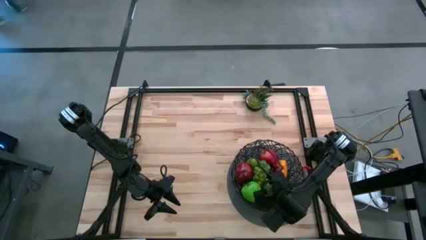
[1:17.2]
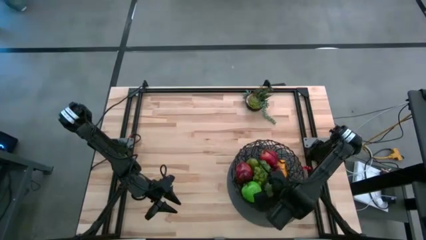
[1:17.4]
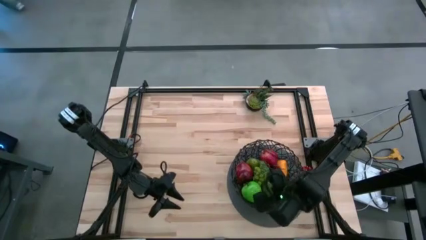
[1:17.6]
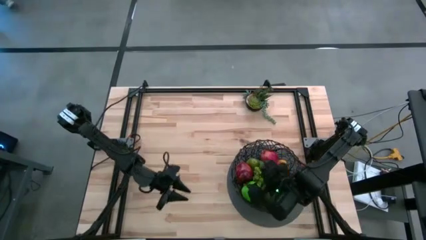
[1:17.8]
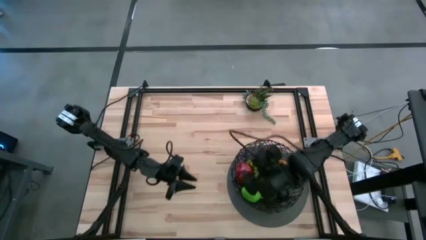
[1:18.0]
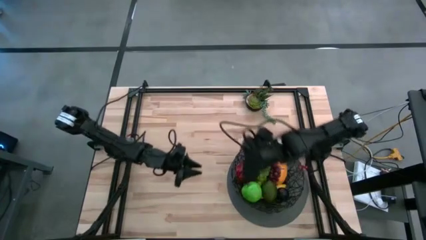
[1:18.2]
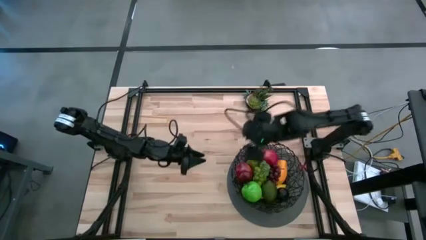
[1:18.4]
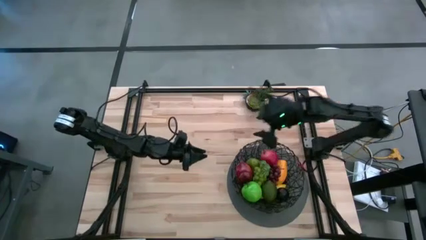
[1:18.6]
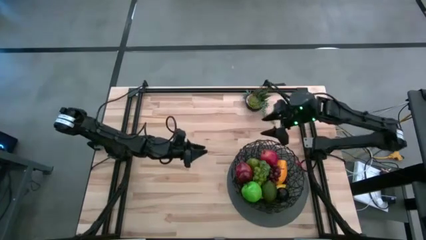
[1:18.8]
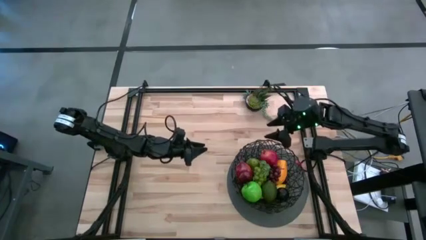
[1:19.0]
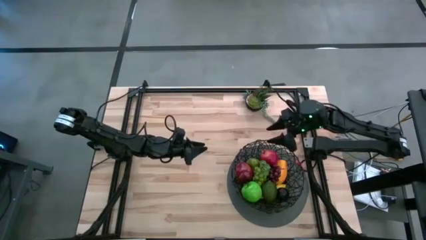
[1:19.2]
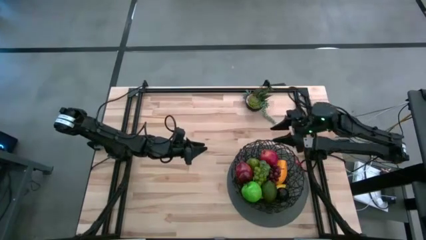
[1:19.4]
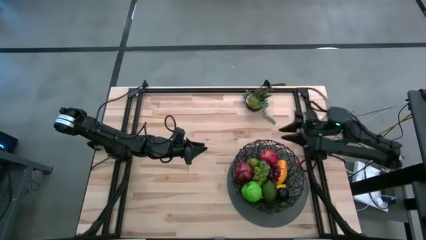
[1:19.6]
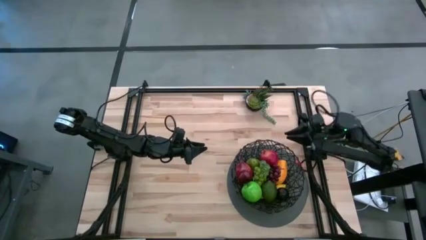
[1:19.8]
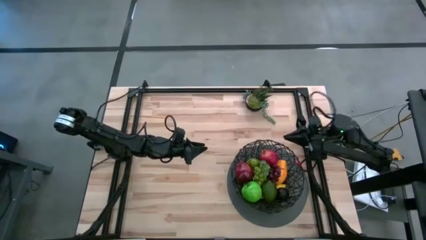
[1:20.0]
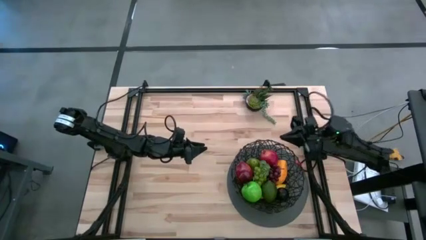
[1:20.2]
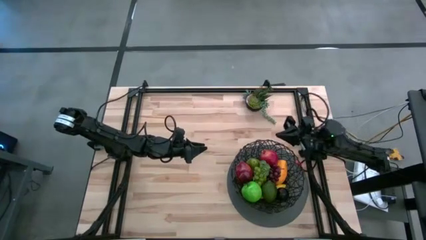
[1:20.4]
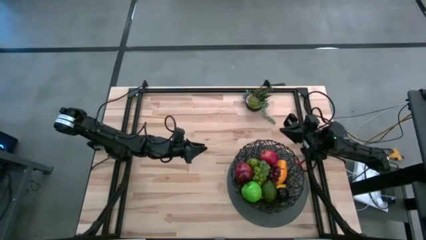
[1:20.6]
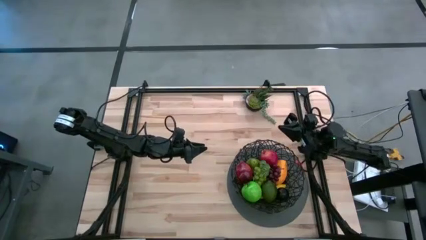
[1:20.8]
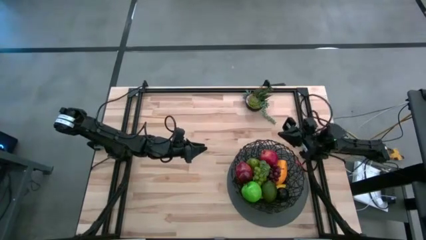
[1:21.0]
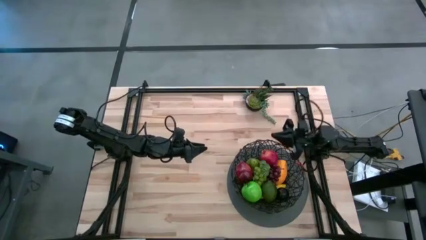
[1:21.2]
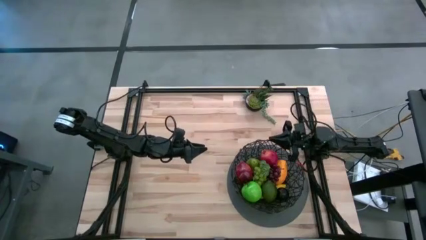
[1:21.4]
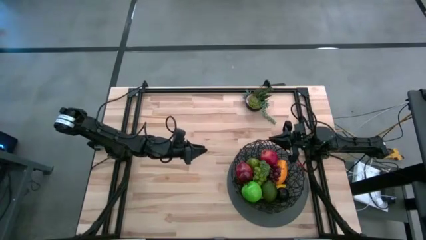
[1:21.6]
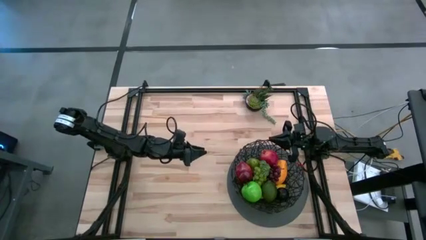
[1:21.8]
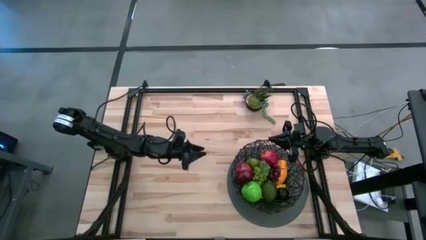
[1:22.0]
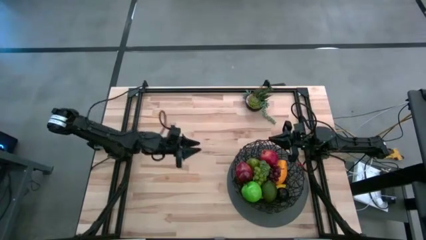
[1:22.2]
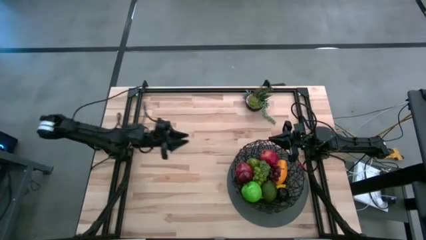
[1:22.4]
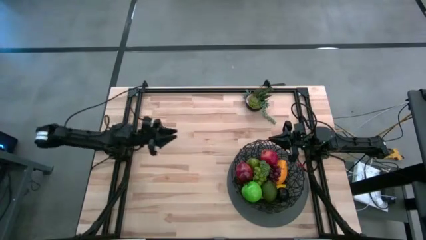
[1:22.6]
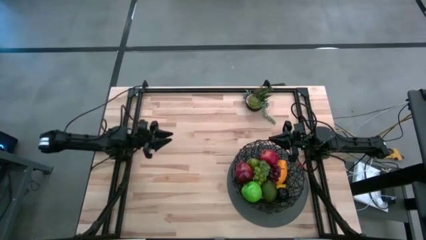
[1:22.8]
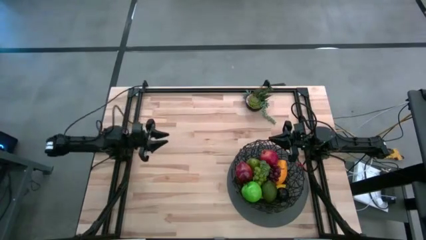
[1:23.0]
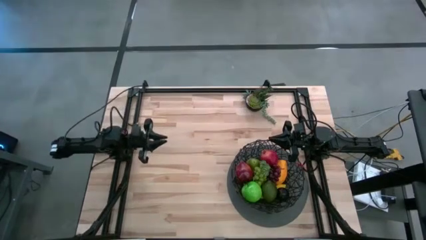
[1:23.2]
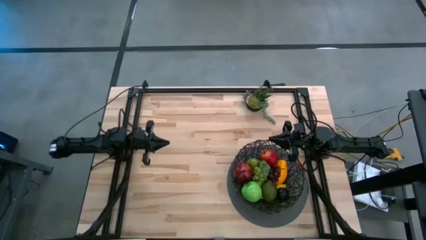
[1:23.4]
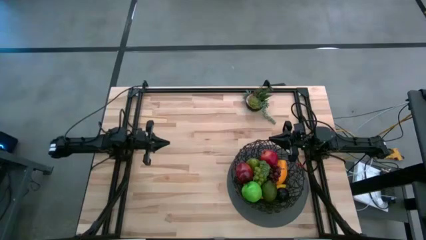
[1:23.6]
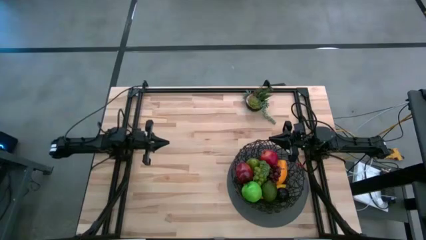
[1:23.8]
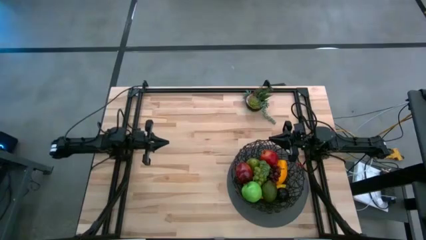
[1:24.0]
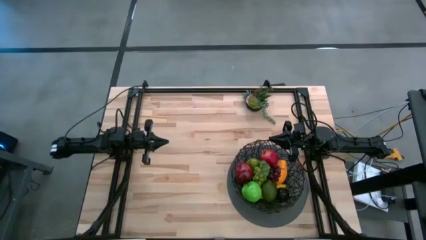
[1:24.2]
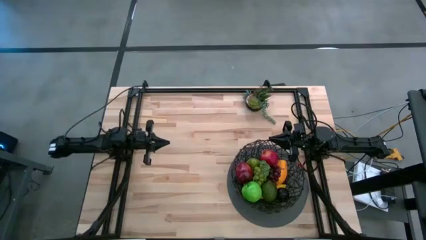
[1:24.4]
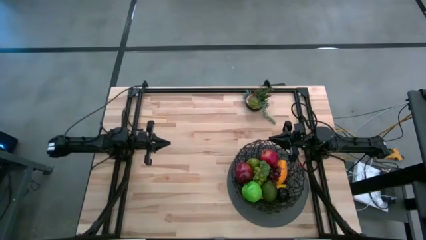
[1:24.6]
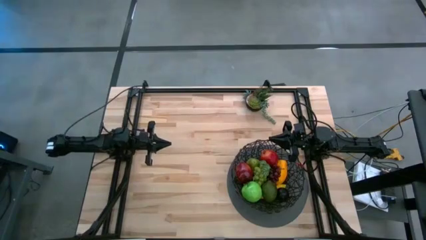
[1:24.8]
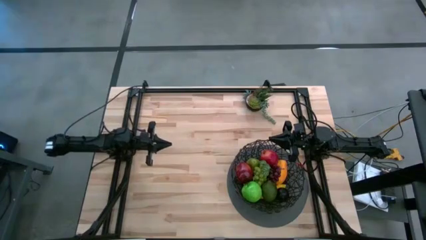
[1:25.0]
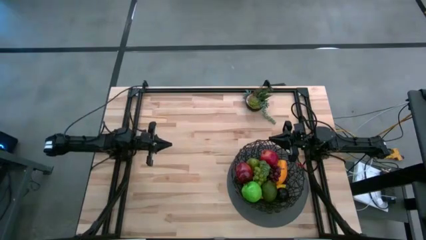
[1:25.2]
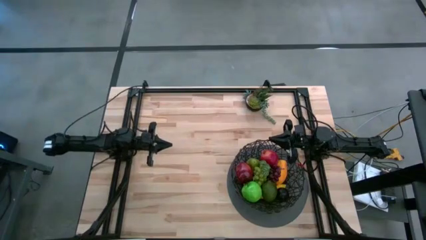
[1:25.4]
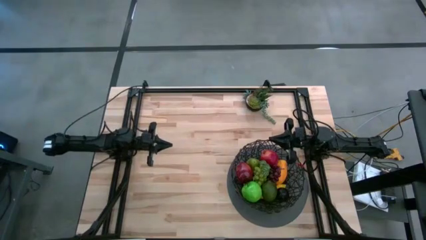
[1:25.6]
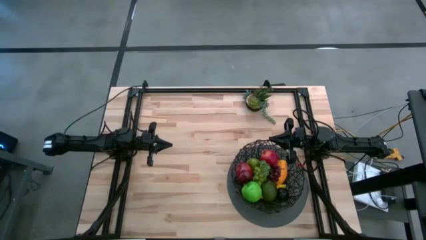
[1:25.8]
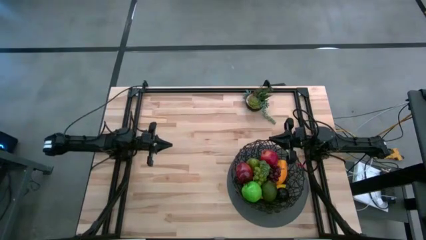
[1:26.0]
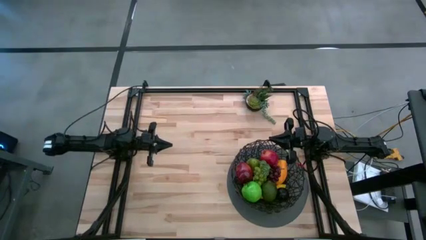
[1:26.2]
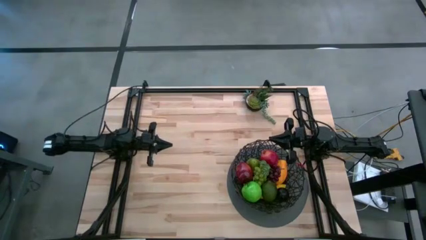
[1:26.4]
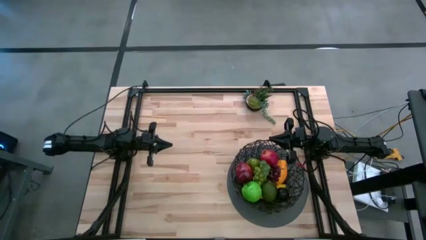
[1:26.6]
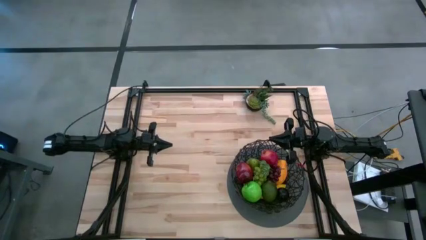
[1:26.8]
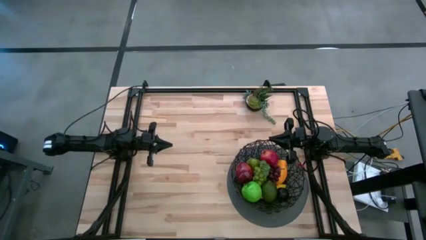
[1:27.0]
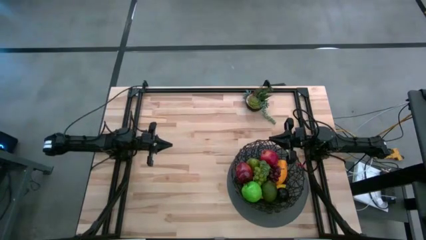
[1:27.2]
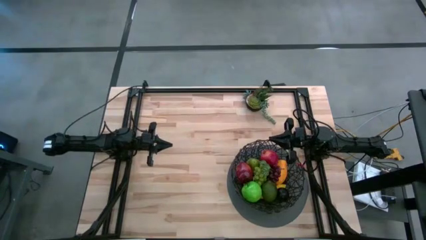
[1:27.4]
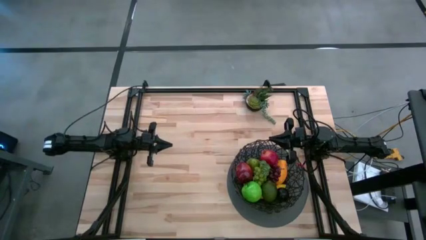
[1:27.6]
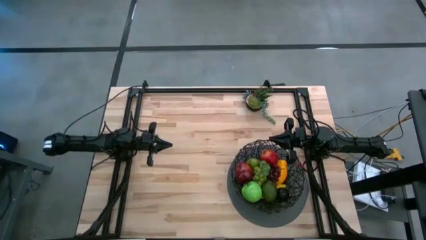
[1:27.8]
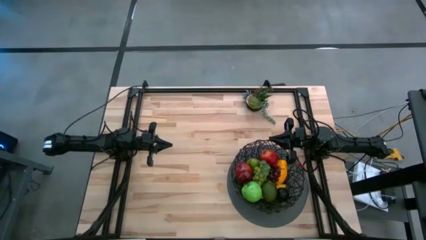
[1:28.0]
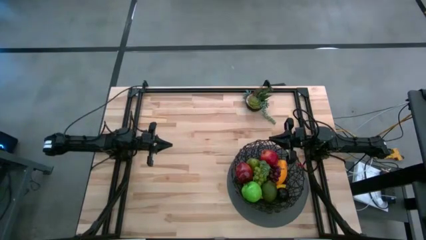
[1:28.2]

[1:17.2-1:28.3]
Task: Build produce basket
Return to Home Position

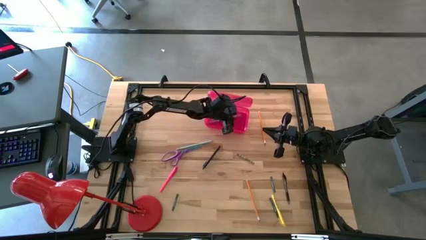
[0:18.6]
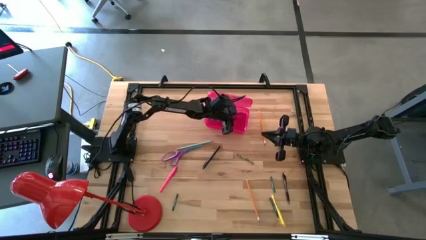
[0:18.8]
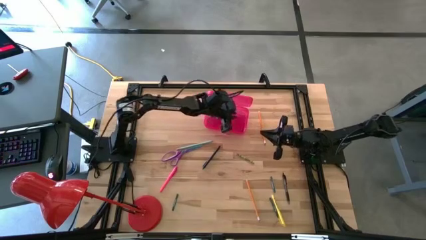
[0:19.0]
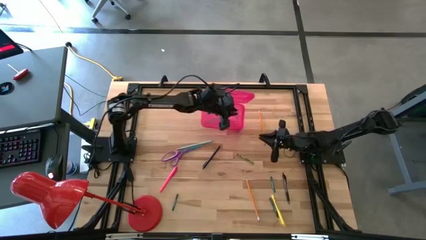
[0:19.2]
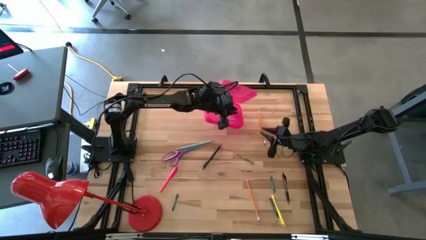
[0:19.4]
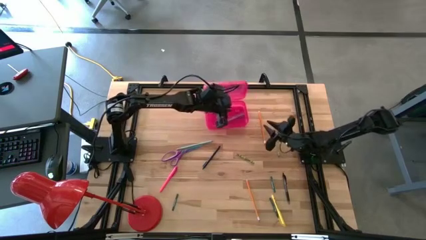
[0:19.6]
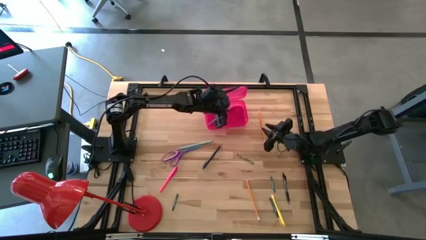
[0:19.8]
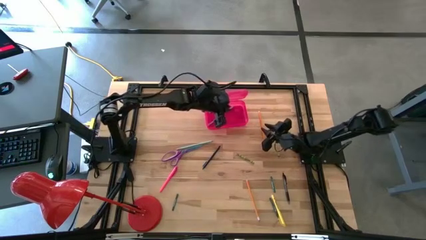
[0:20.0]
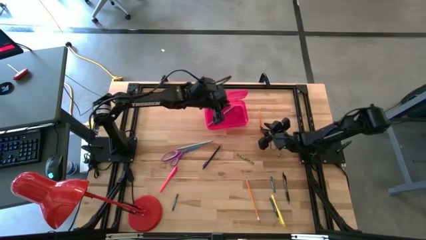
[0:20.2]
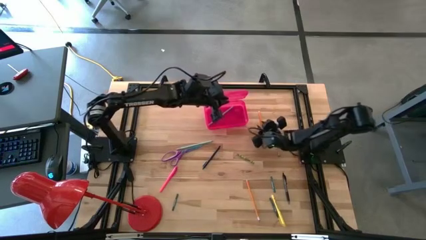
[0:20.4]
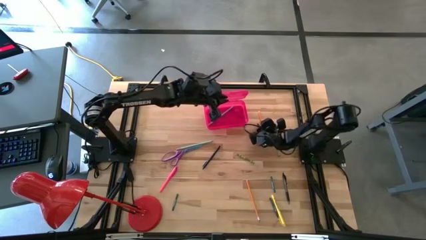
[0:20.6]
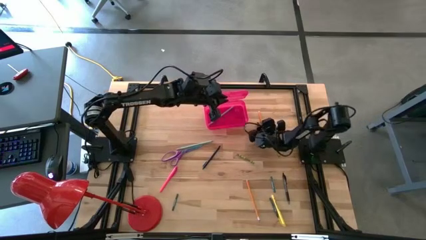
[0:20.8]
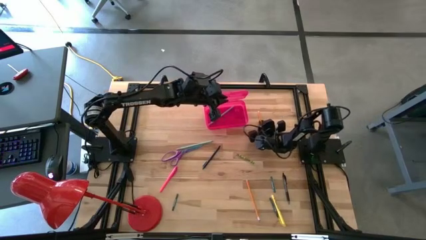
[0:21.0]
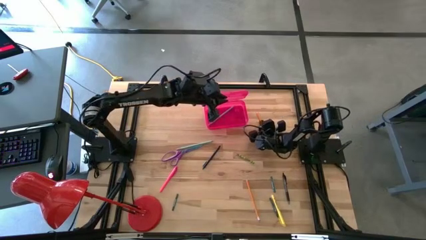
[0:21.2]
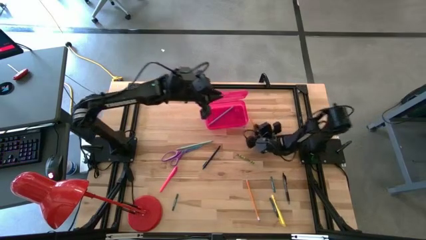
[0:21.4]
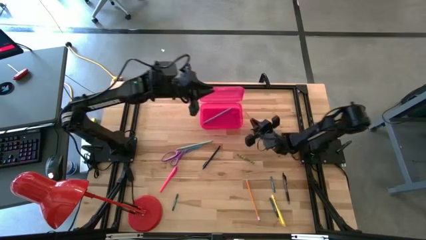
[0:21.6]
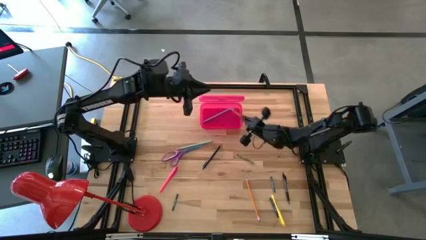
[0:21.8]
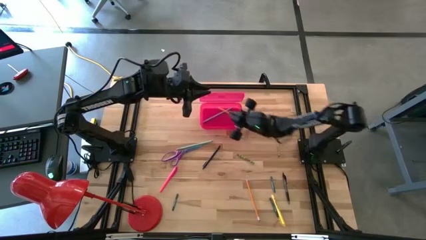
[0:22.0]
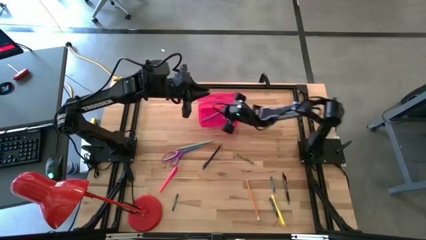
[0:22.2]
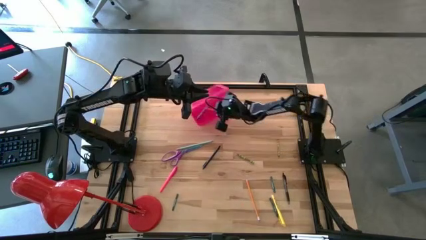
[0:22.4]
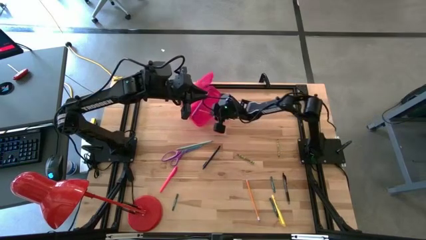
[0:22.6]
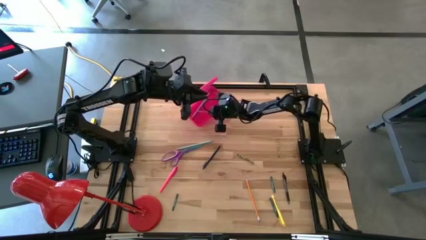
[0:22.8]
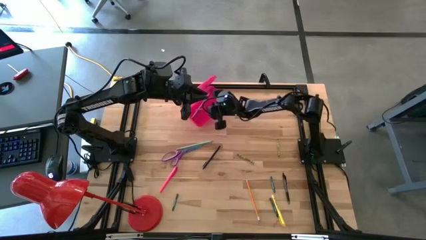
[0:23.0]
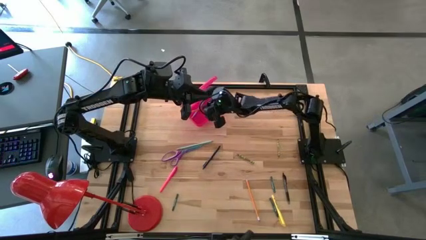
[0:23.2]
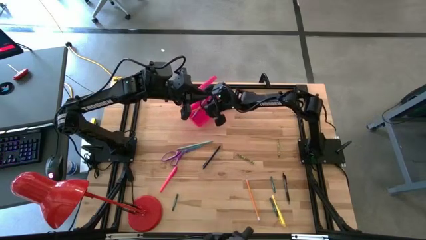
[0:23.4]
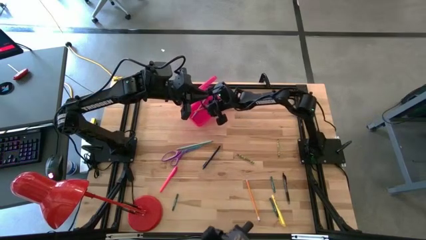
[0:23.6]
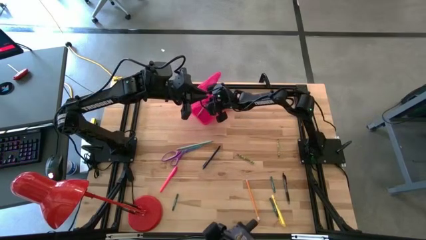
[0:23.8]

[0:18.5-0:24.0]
Task: Pick & place school supplies into a supply box
Put the top yellow pencil into the pink supply box
